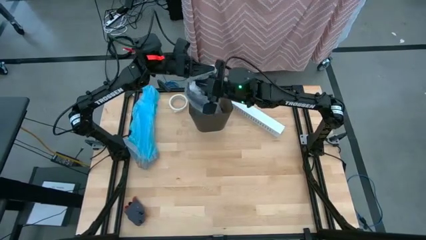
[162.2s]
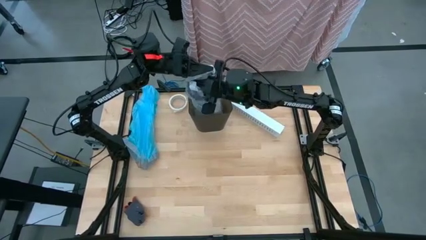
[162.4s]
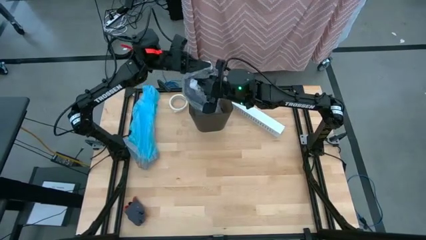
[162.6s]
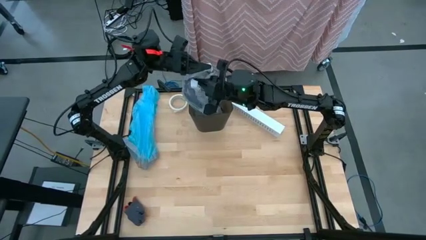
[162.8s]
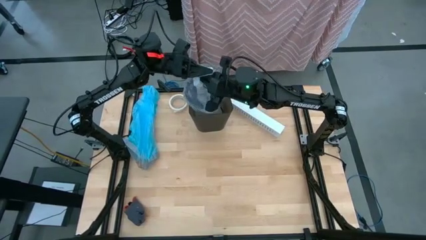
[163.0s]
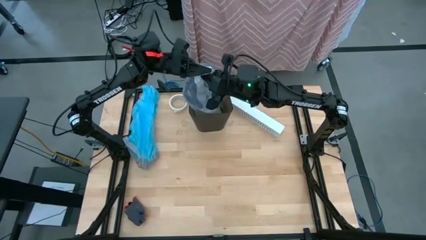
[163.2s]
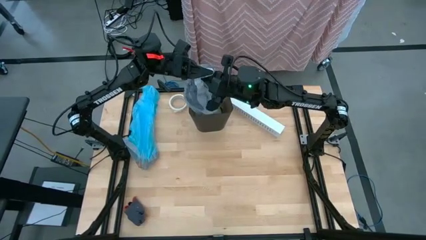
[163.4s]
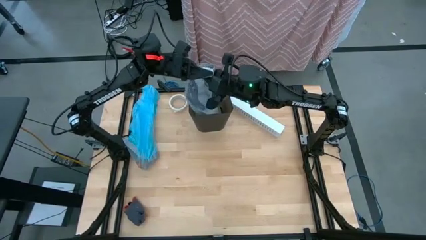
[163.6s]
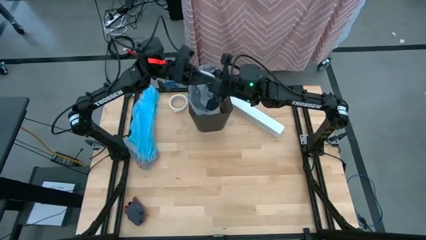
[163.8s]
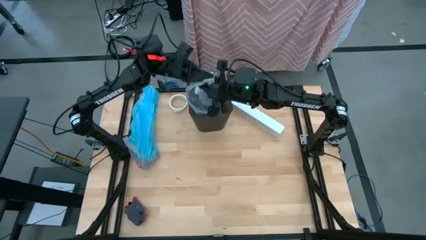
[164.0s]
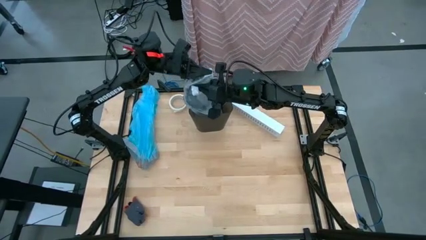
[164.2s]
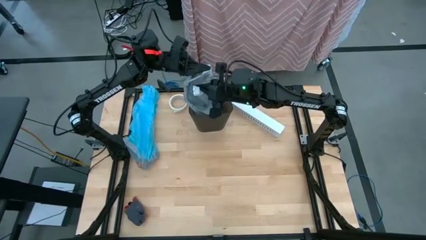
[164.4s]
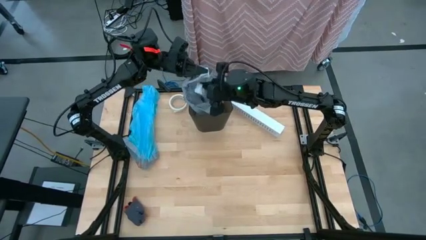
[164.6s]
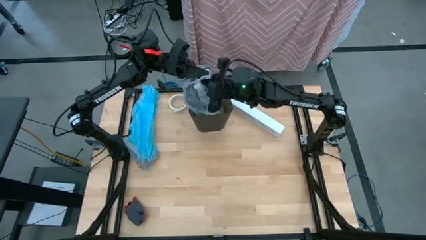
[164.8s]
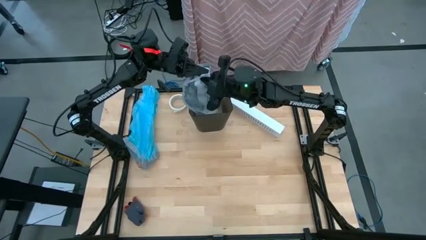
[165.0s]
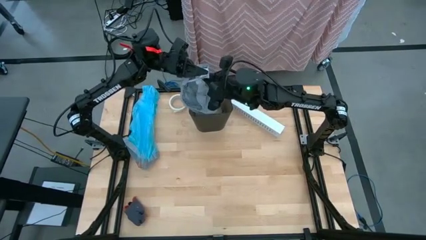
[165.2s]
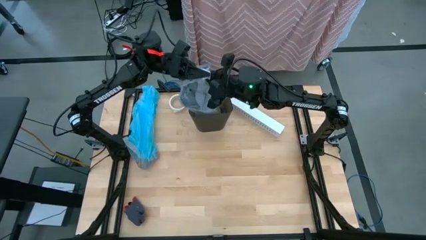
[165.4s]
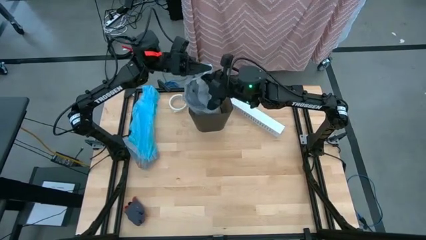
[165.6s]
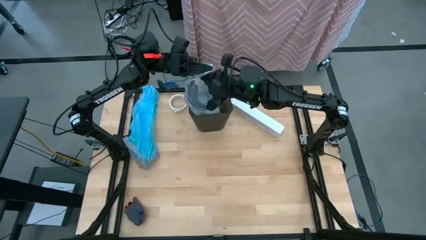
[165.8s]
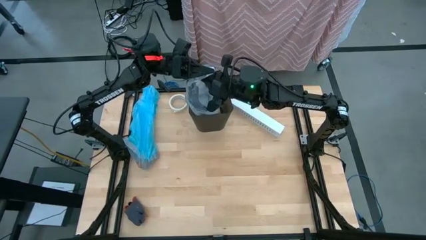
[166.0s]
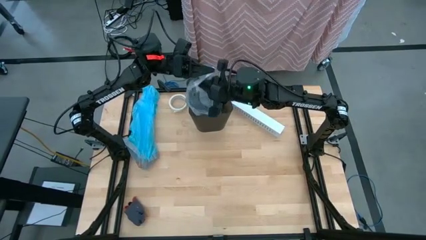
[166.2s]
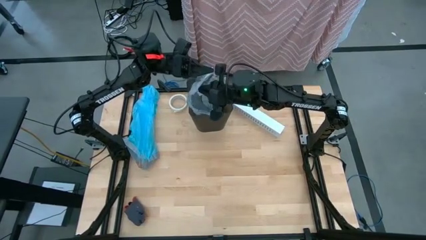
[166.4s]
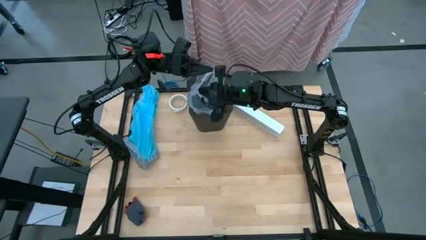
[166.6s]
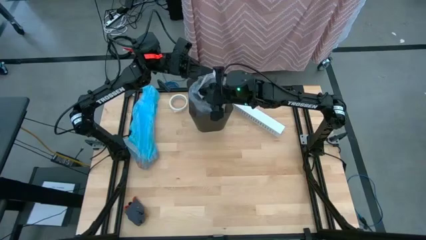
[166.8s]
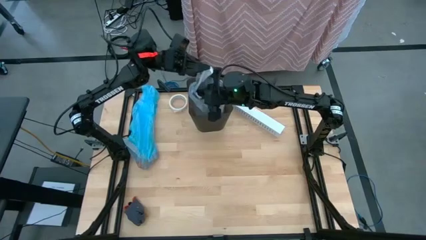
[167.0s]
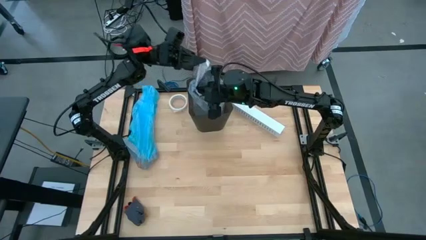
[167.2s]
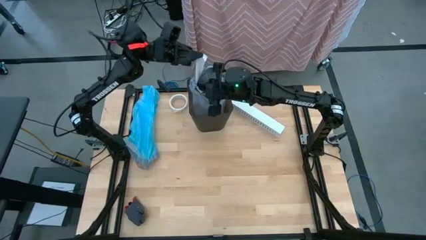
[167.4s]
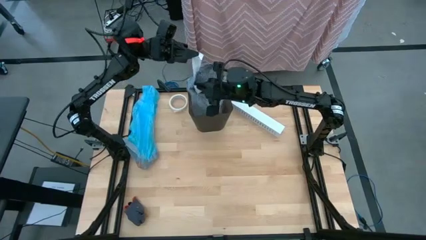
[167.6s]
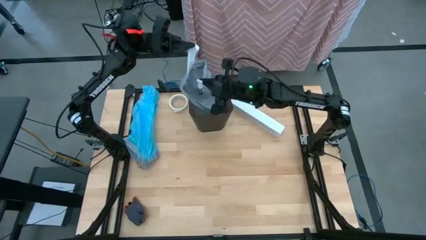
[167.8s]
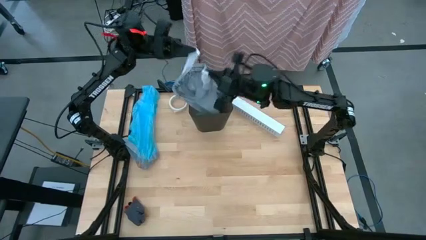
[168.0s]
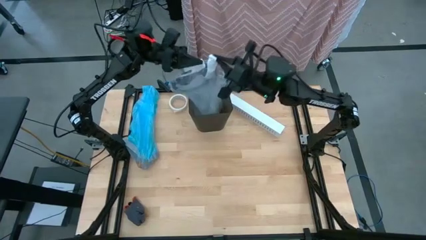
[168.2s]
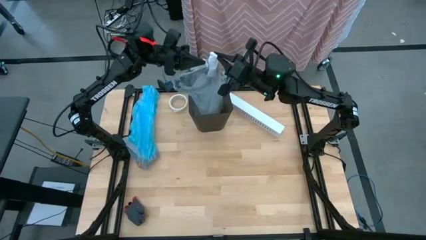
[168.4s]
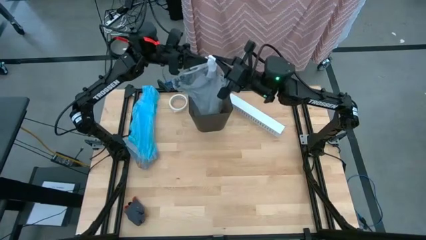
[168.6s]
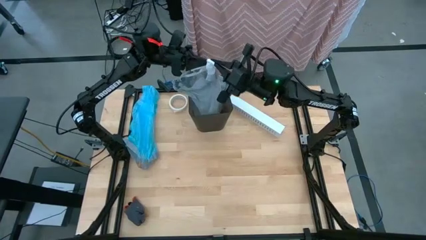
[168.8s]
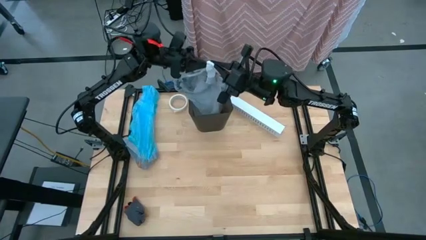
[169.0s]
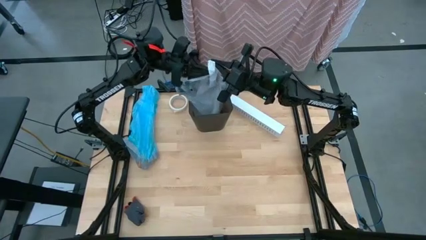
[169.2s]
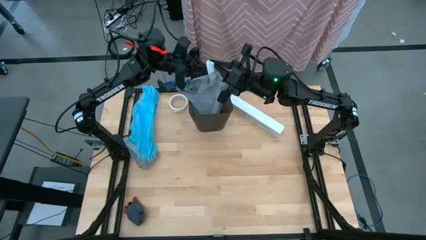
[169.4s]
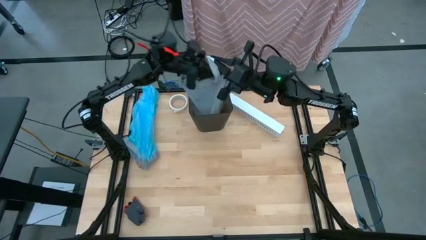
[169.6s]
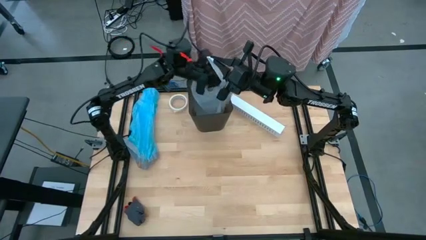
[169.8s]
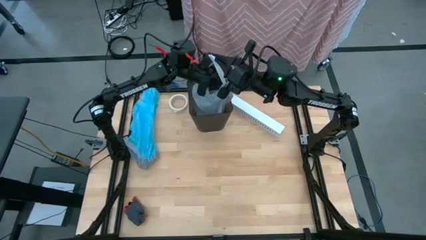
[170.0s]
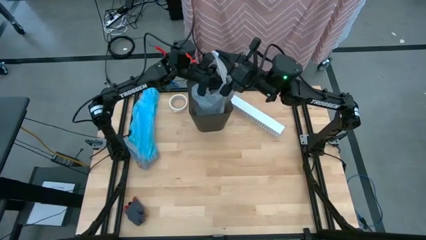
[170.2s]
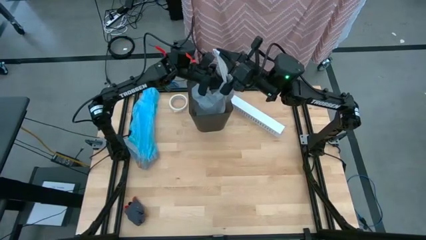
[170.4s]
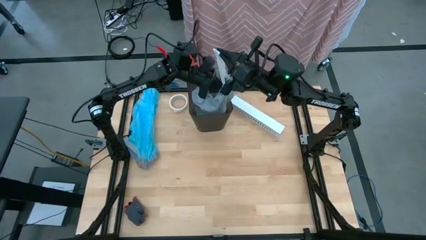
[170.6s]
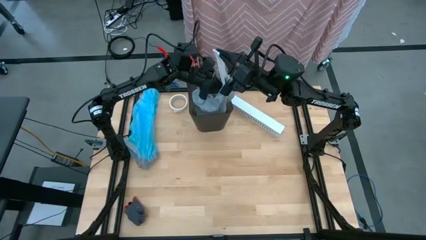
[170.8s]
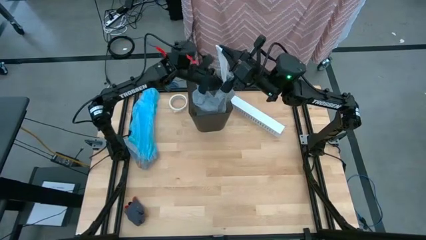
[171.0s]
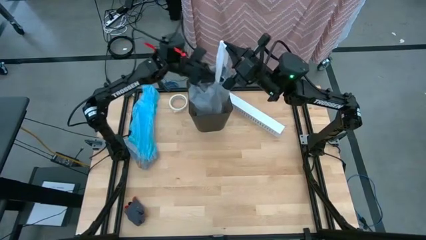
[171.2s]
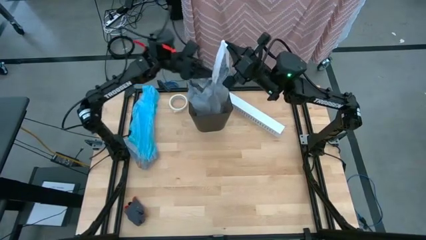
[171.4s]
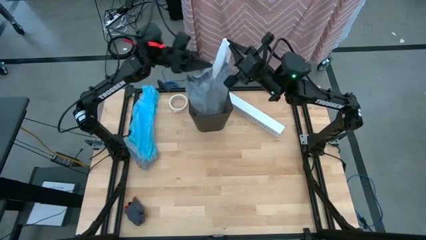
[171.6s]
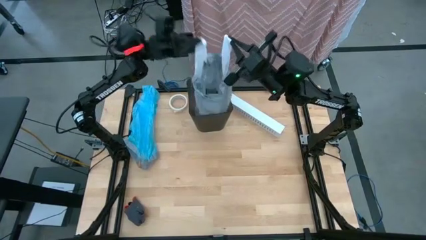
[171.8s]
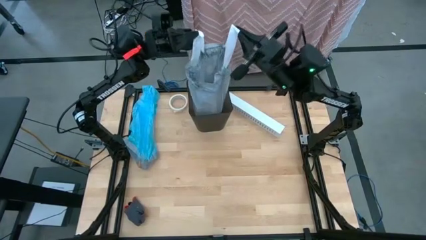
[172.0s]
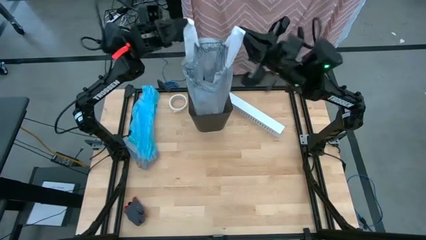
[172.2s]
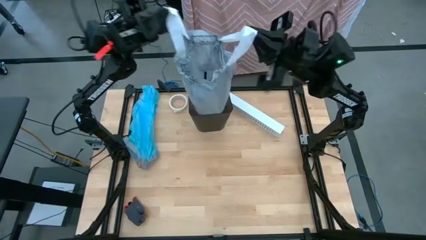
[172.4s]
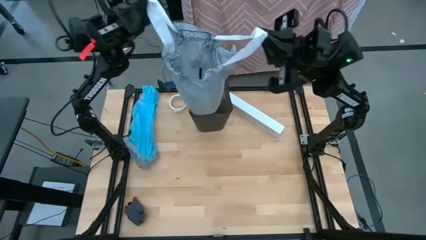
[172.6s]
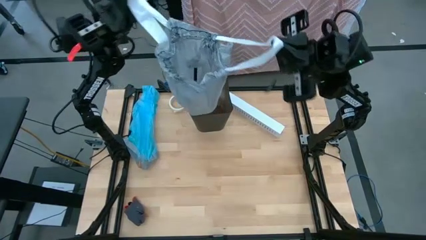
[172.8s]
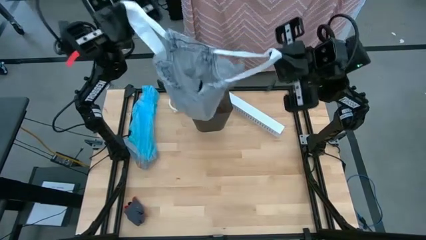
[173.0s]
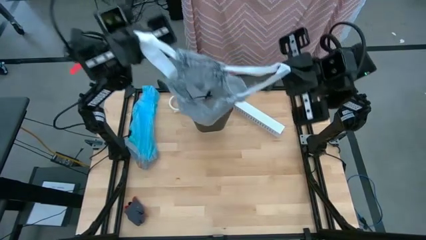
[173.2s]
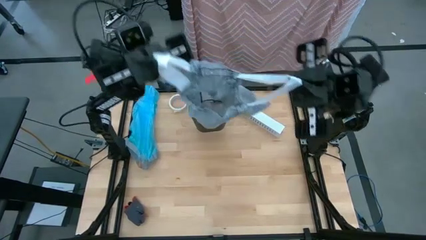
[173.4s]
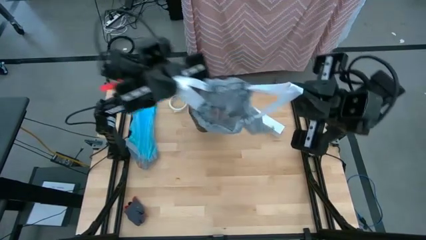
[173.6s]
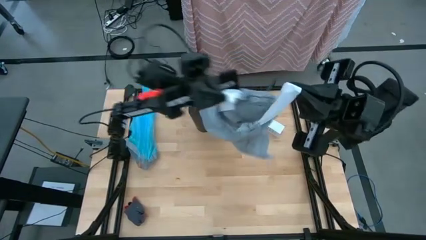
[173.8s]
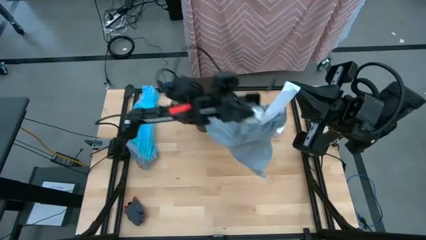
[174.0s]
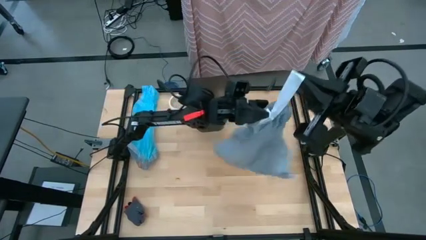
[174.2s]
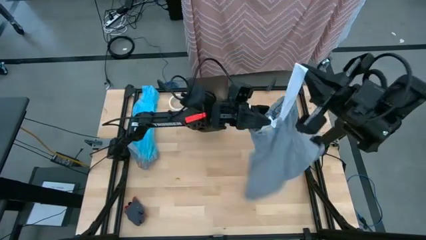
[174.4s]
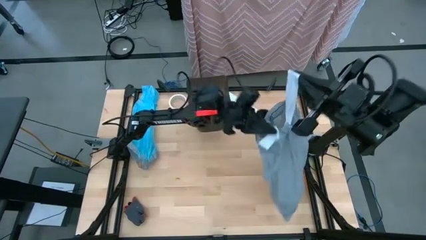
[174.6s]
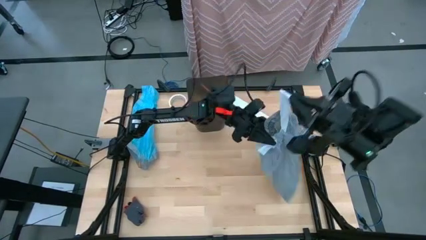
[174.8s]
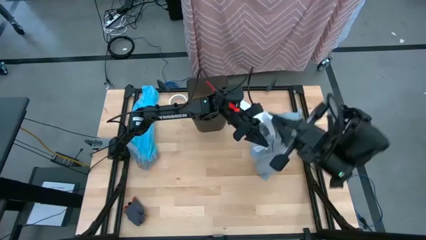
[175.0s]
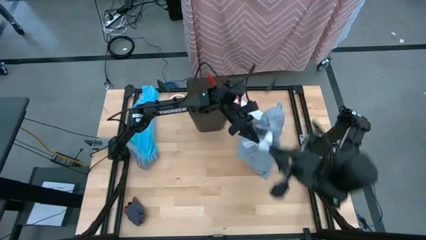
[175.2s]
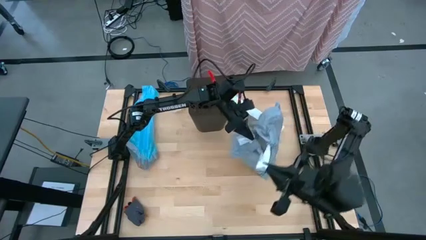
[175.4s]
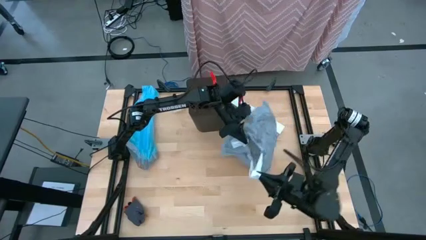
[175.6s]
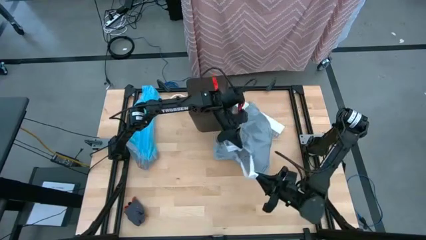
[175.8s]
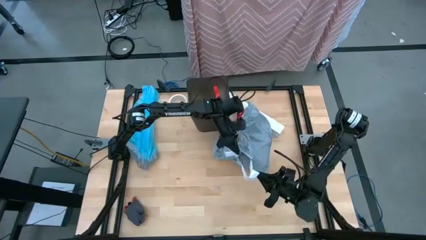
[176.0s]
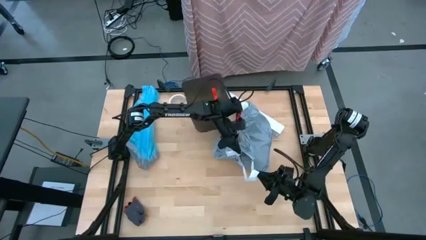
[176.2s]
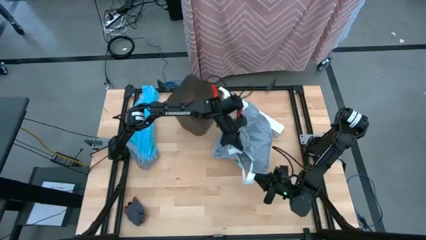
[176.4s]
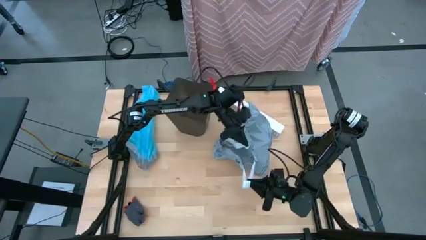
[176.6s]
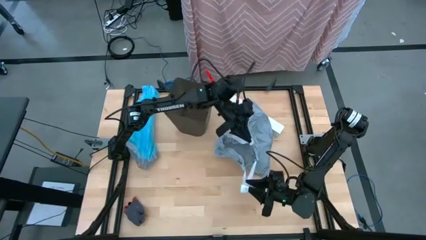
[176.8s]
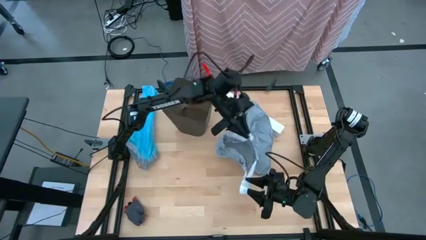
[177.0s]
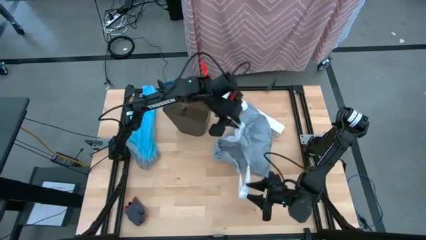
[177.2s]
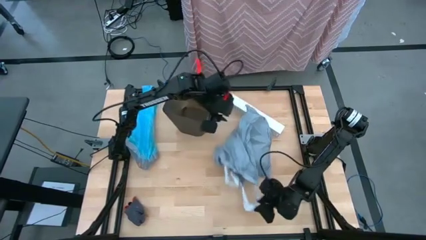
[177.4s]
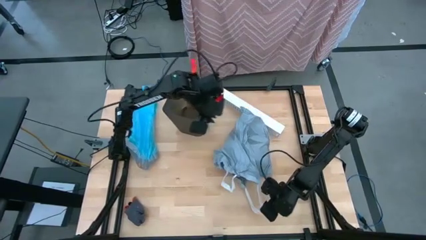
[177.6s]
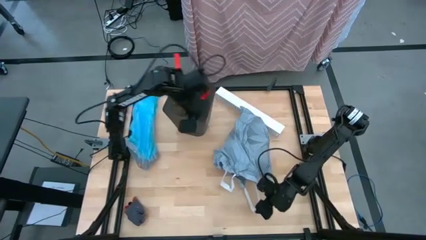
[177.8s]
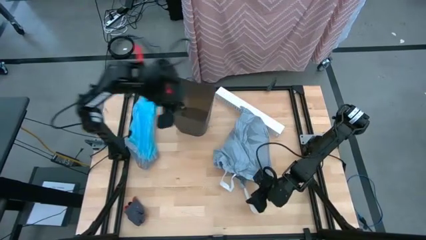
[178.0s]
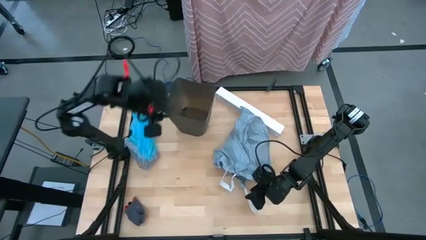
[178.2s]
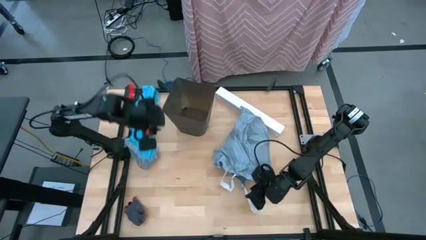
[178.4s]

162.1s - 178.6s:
Task: place trash/remove bag and relplace
Remove the trash bag from the trash bin

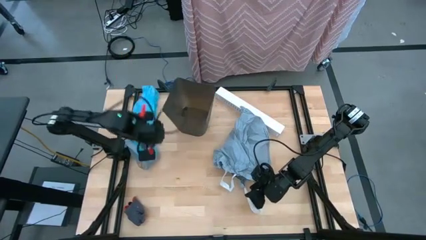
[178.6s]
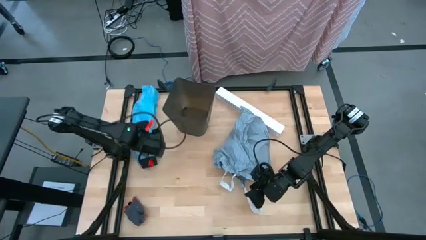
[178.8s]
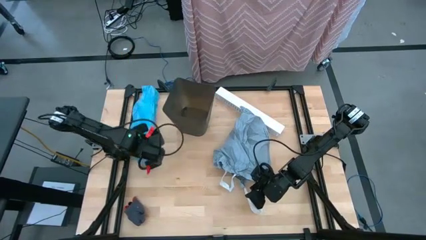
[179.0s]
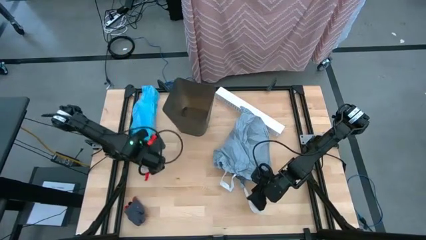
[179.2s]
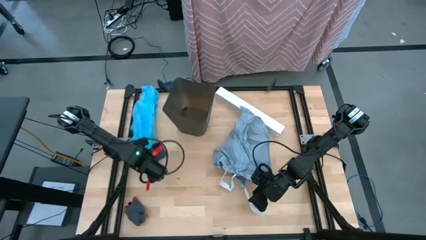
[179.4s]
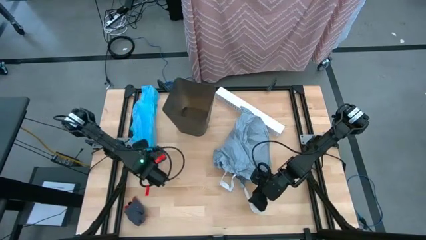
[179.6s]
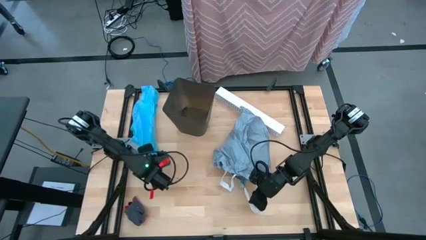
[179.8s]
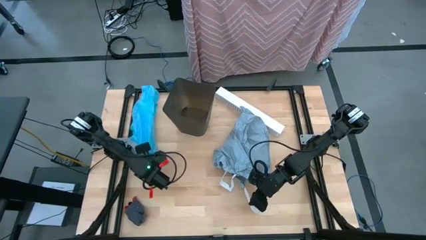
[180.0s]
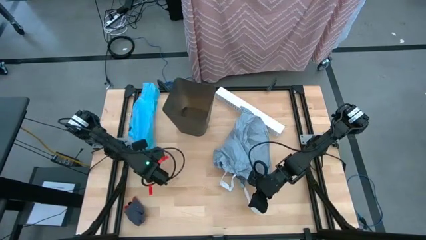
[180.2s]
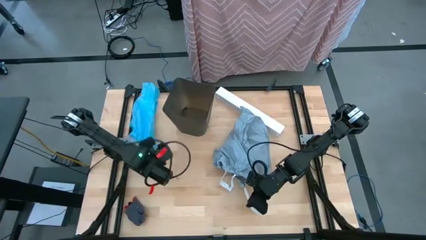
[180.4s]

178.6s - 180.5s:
Insert a new trash bag into the trash bin
